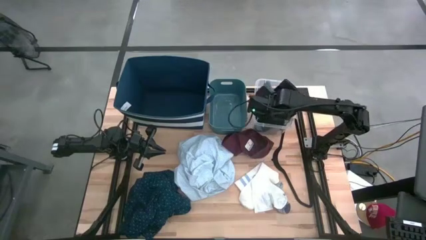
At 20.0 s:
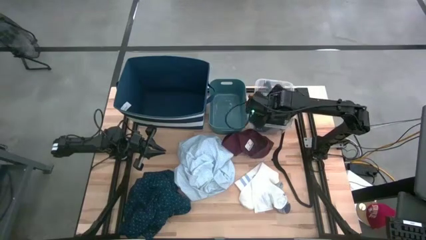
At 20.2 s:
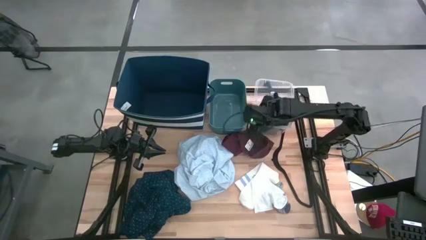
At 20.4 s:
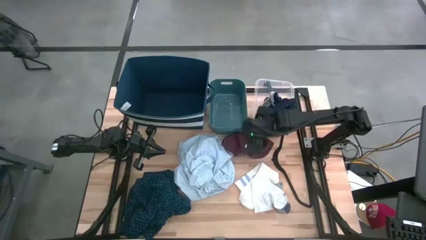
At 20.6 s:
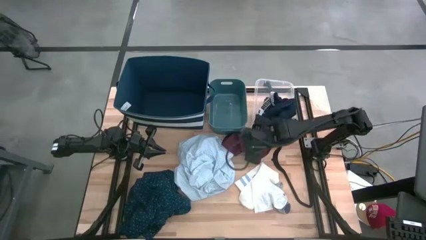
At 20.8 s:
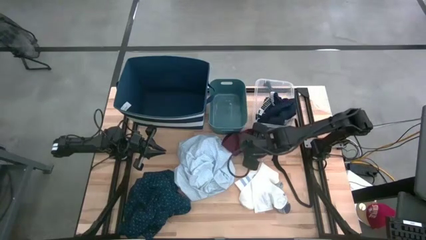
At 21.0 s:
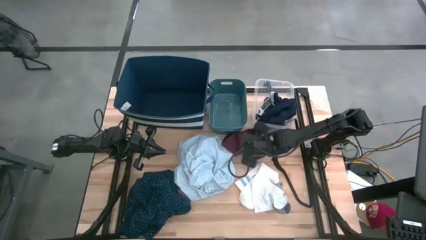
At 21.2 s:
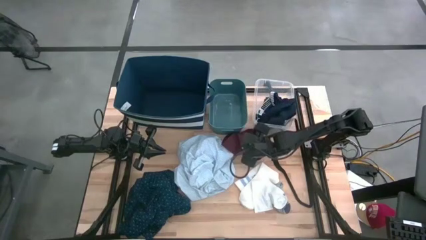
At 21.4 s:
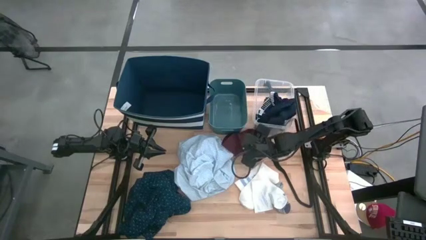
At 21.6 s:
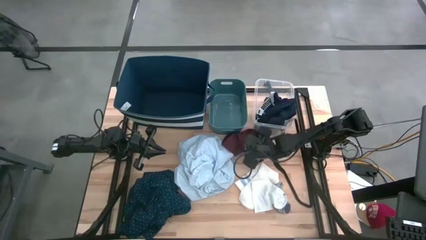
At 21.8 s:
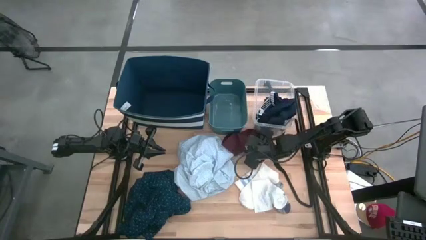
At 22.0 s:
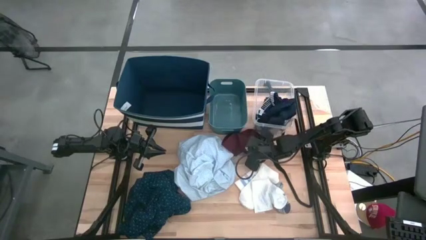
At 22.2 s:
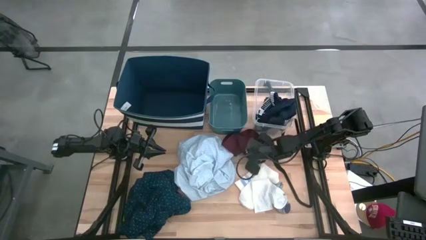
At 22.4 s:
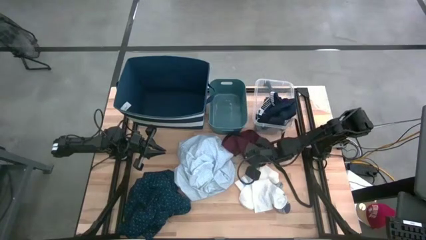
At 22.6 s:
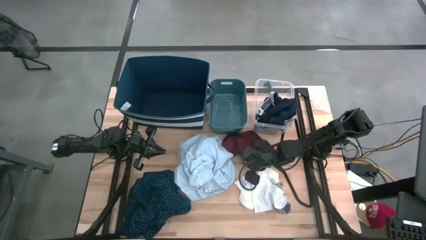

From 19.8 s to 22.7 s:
Task: Pick & Place Cloths
Put the dark red underwear into the transparent bin

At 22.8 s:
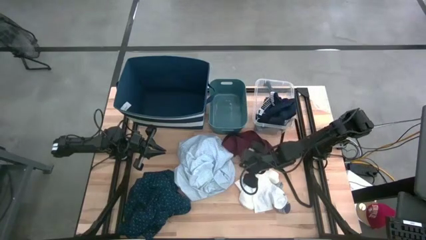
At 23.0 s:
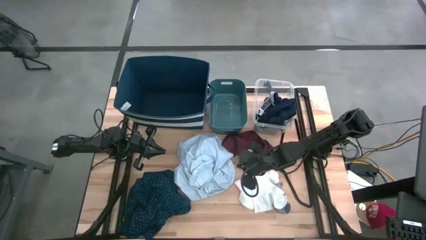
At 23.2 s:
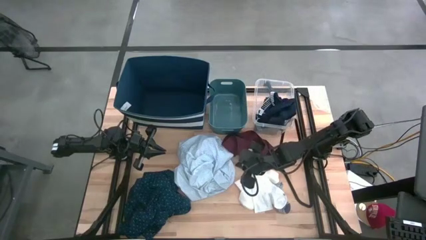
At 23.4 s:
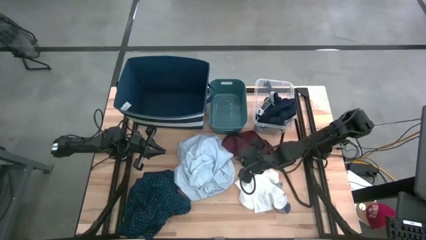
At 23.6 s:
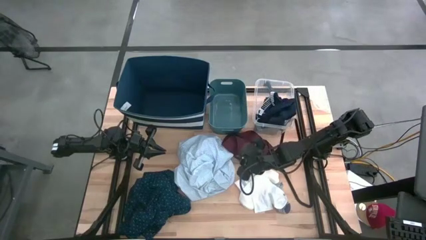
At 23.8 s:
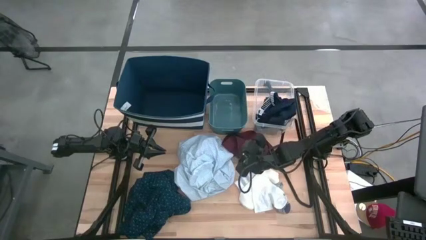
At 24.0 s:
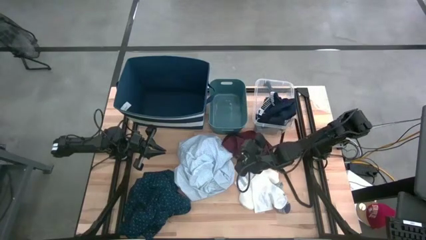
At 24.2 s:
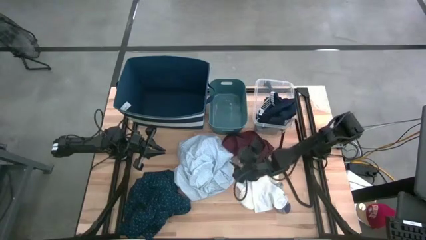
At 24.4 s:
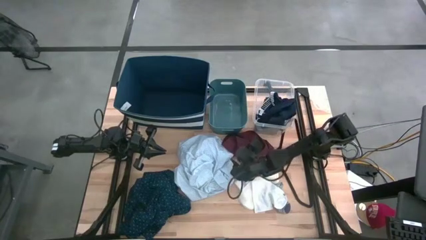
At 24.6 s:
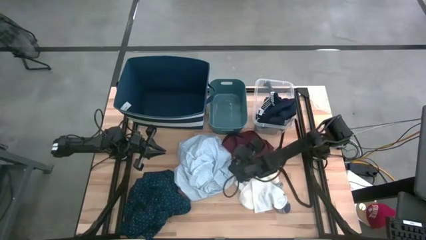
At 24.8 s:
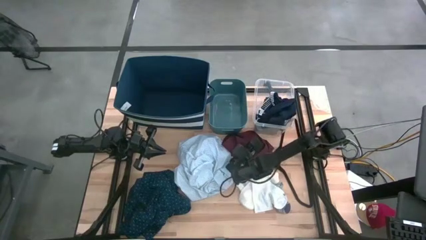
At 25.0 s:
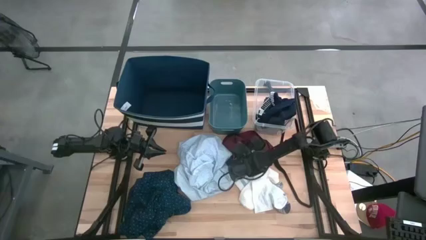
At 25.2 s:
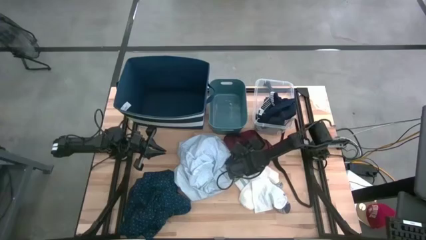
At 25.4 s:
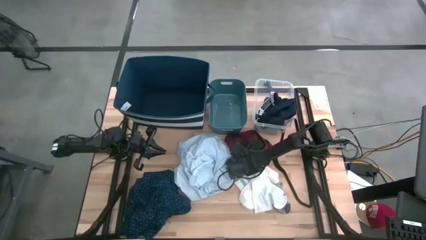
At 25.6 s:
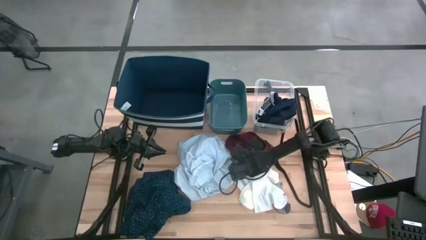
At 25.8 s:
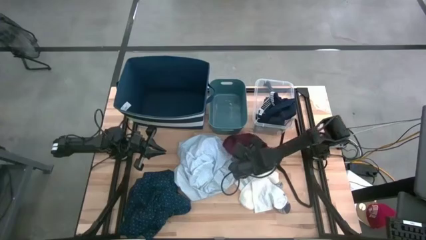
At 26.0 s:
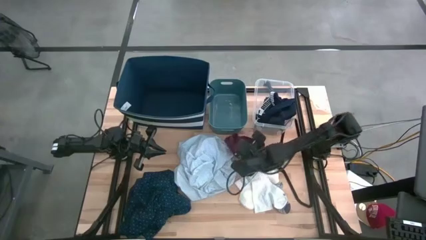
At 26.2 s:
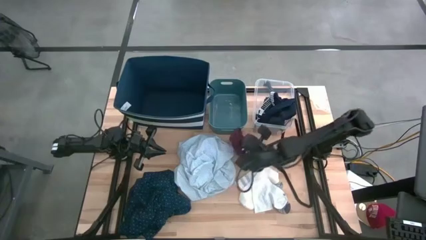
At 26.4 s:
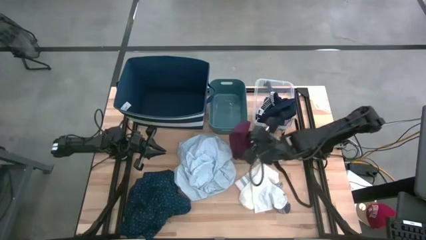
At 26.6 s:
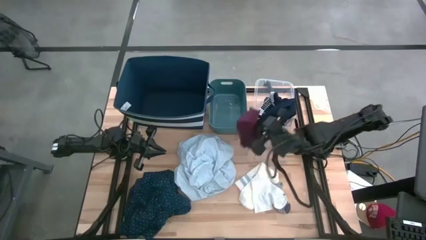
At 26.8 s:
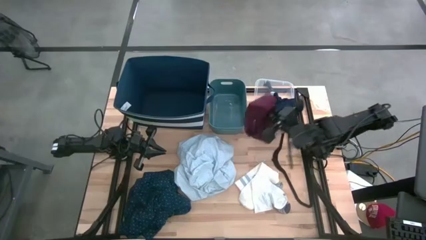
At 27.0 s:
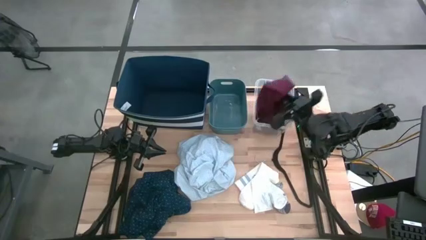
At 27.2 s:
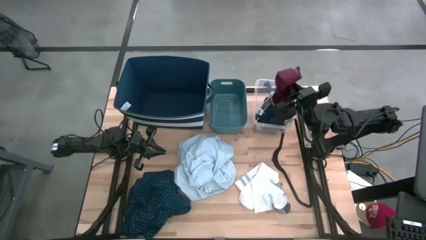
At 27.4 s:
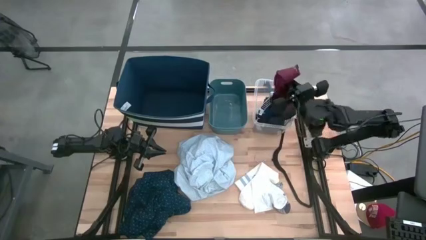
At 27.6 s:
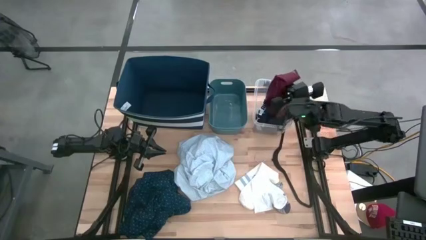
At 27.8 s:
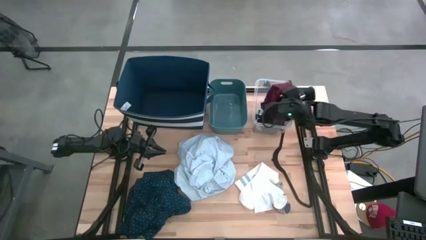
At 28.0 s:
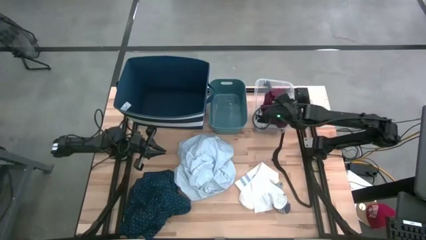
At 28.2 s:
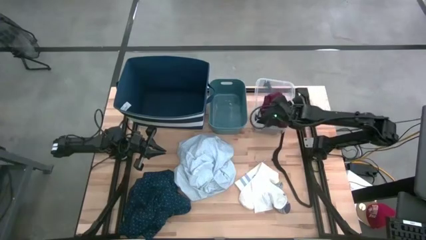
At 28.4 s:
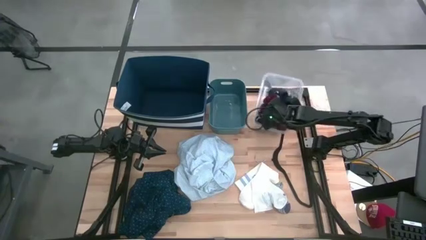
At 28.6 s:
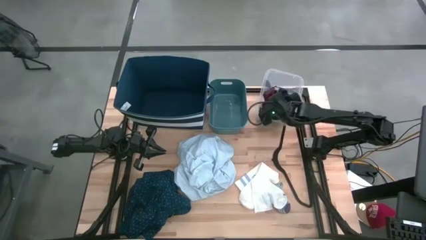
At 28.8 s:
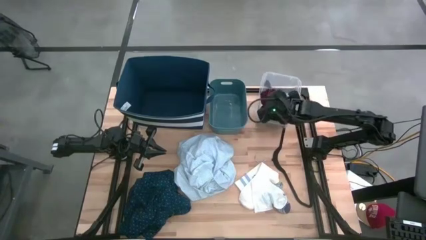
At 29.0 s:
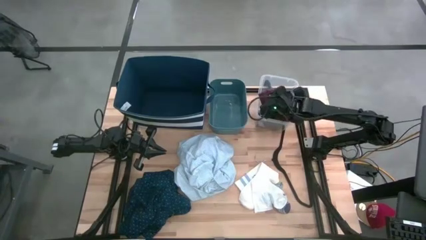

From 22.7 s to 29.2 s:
Put the dark red underwear into the transparent bin

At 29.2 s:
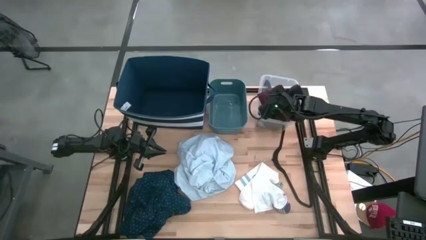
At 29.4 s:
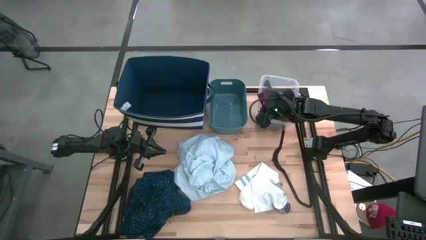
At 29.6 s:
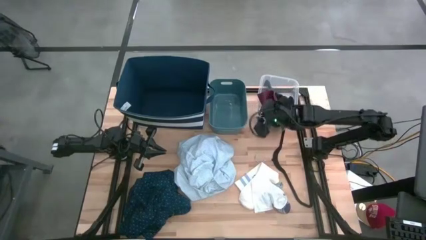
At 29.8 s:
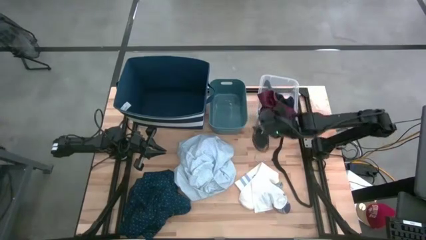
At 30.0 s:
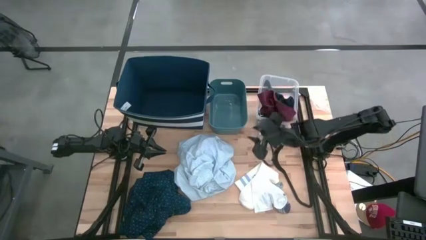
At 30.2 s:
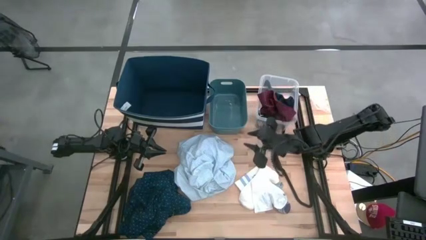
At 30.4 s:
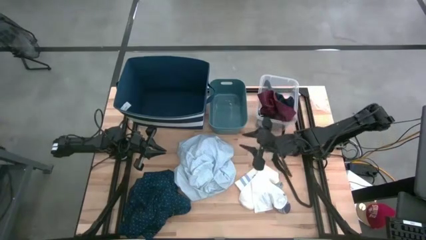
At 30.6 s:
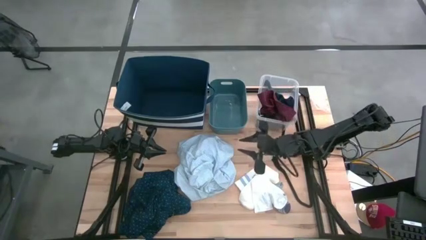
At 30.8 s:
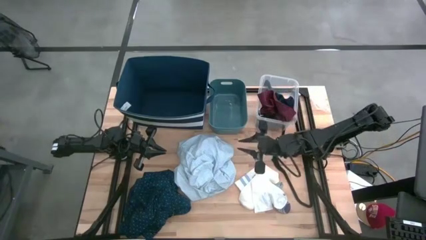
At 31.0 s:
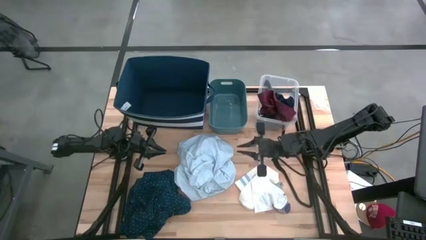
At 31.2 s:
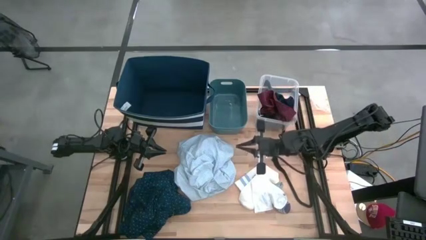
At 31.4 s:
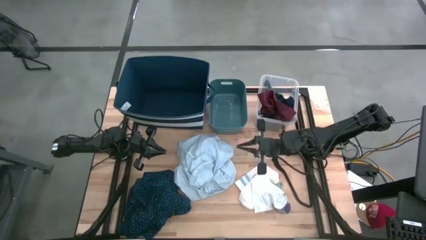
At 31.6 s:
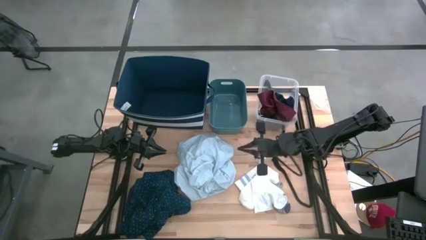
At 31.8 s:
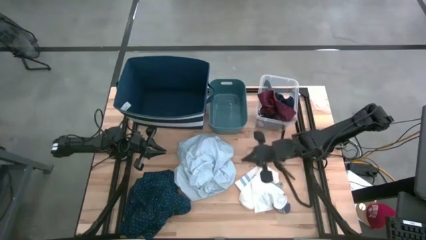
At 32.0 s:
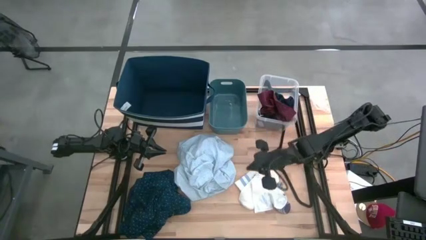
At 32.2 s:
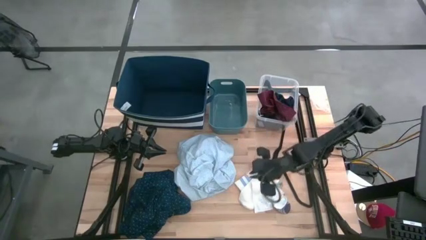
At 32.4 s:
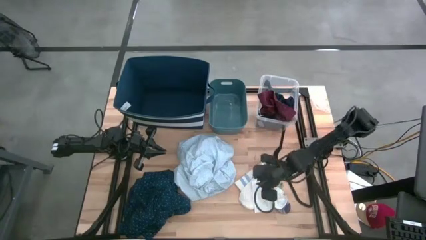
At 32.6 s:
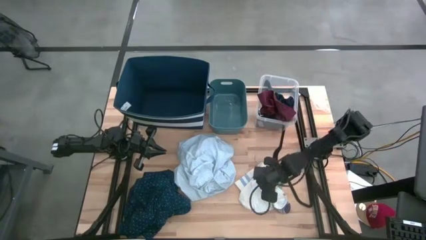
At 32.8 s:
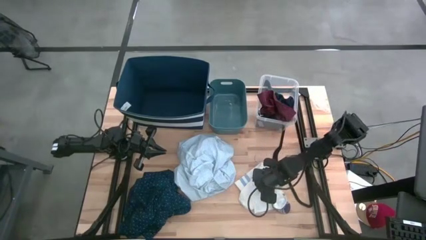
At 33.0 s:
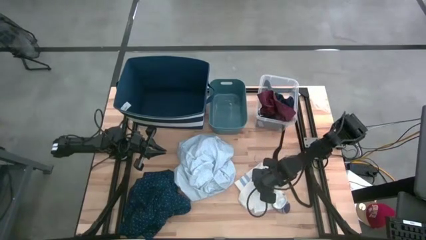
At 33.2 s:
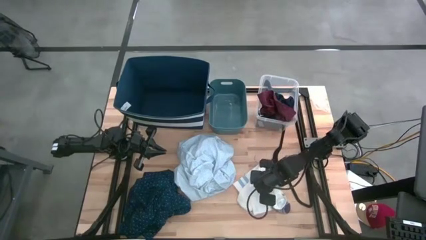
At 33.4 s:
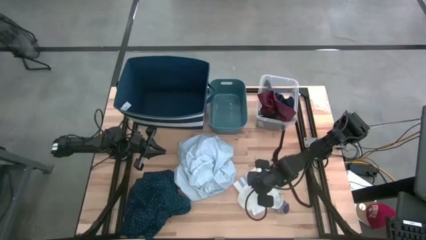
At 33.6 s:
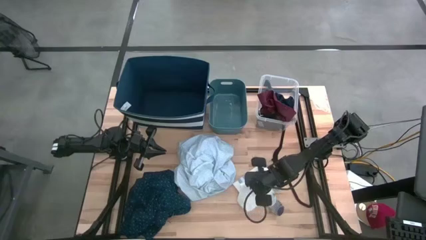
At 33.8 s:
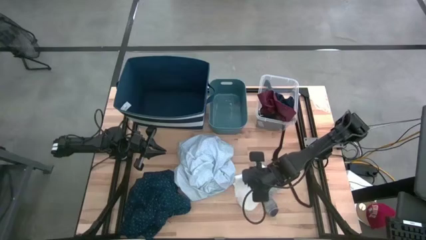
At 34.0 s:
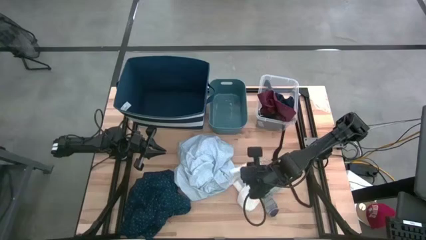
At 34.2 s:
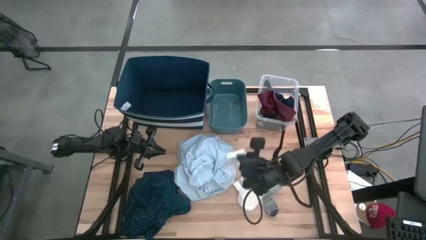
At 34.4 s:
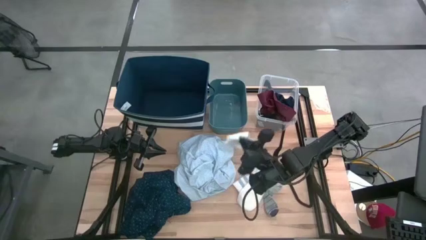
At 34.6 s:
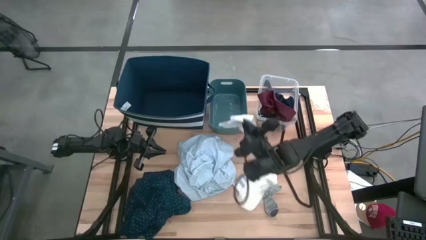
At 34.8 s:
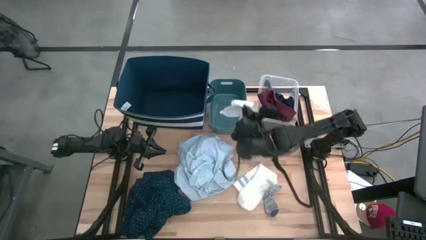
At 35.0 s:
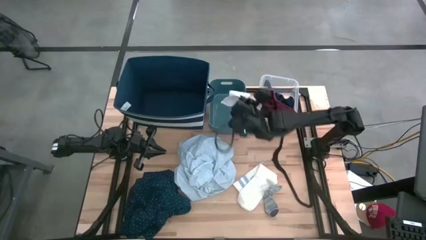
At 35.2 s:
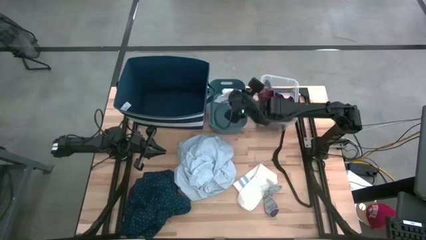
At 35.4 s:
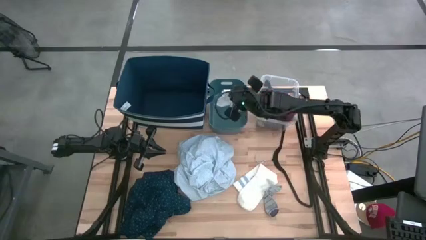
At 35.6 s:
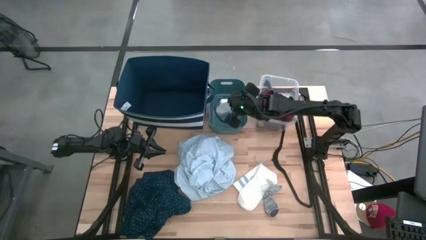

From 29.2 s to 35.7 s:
Put the white sock into the light blue bin
